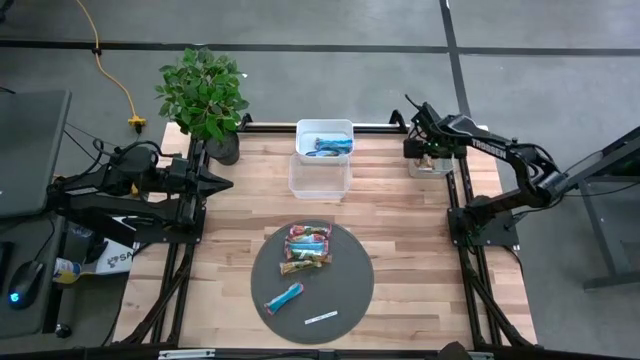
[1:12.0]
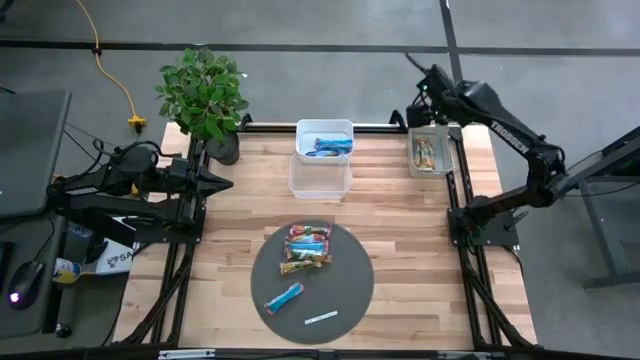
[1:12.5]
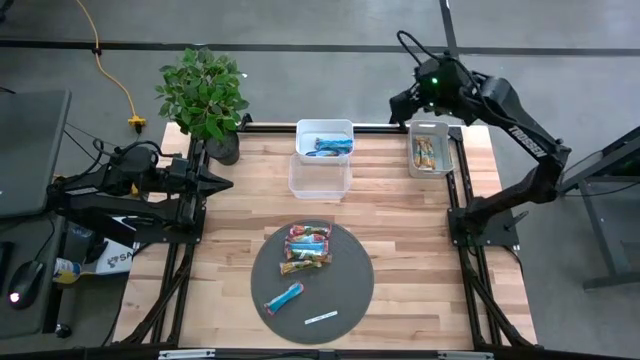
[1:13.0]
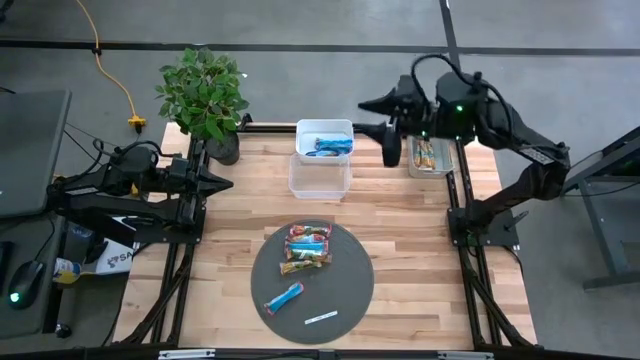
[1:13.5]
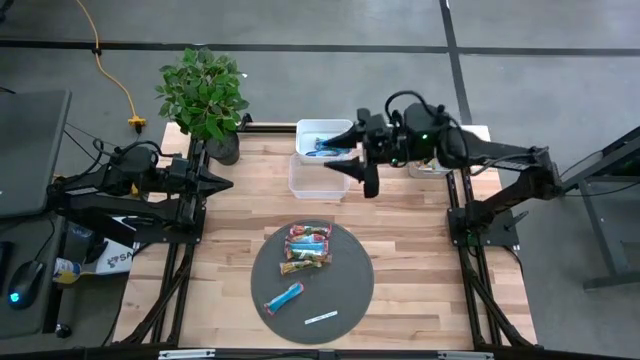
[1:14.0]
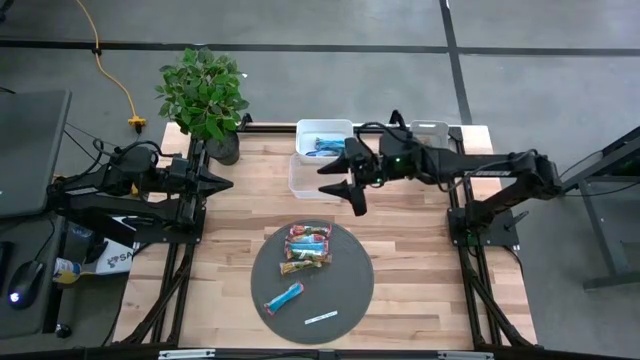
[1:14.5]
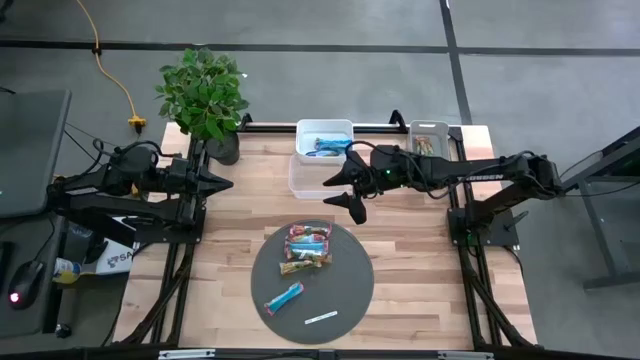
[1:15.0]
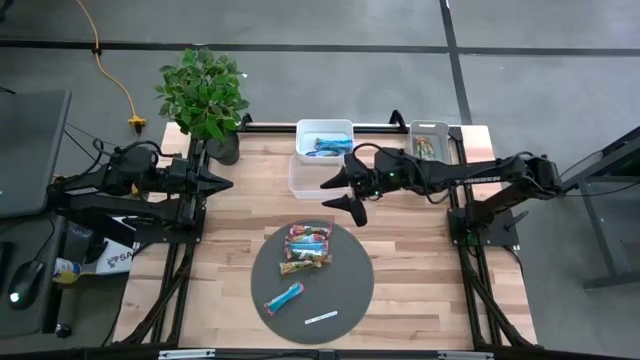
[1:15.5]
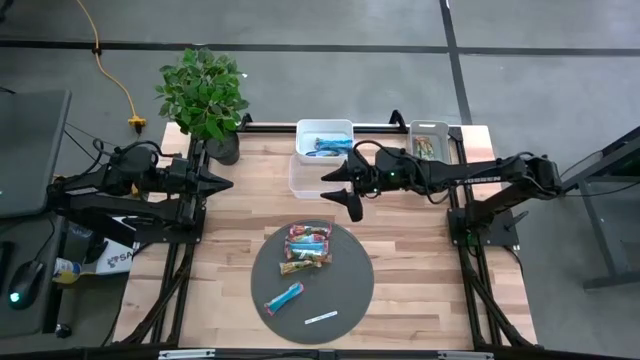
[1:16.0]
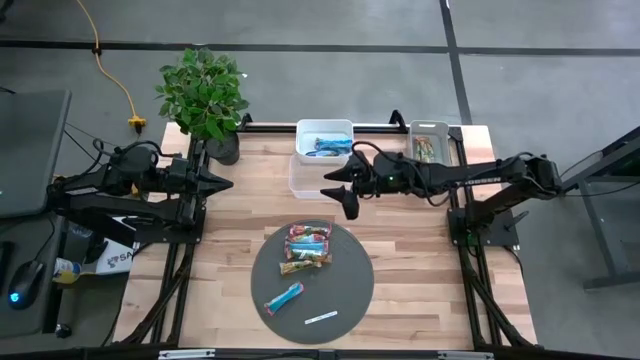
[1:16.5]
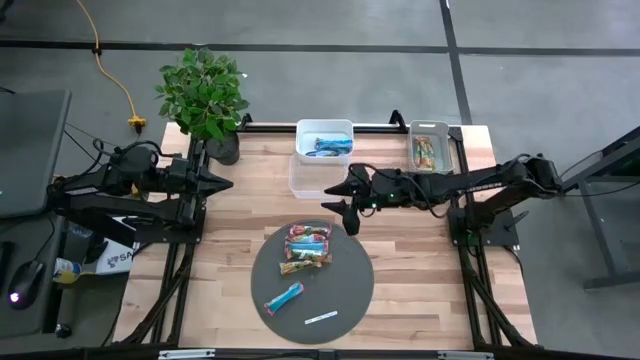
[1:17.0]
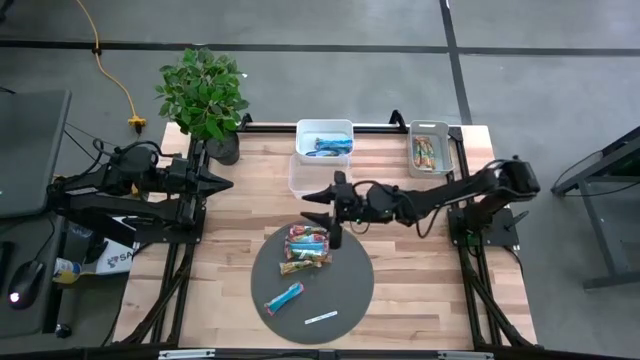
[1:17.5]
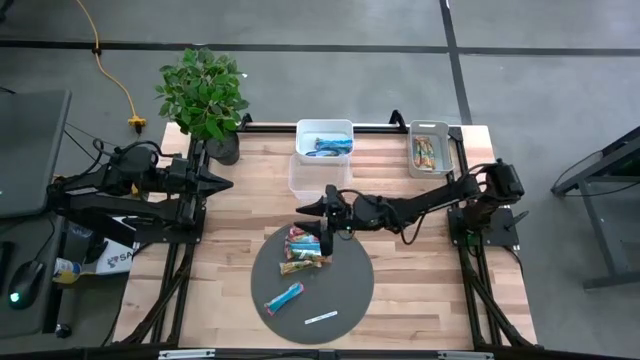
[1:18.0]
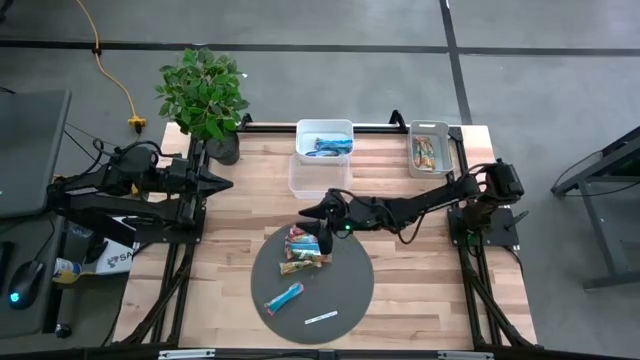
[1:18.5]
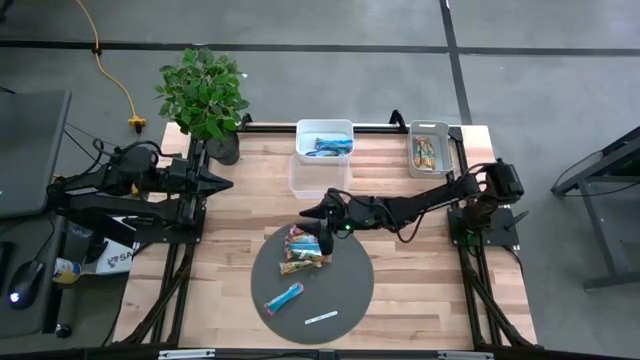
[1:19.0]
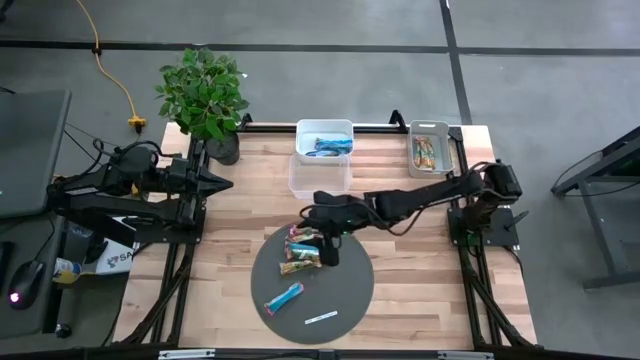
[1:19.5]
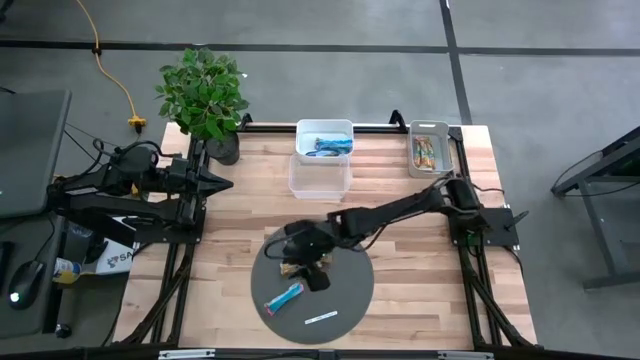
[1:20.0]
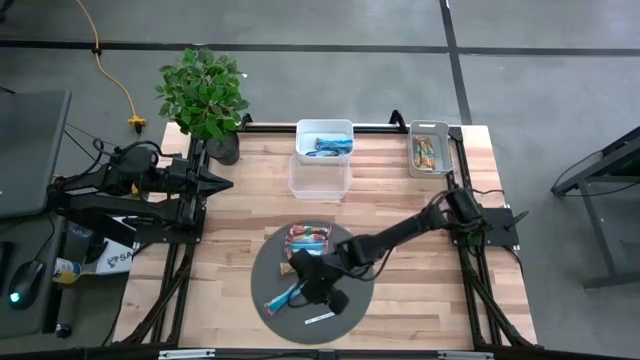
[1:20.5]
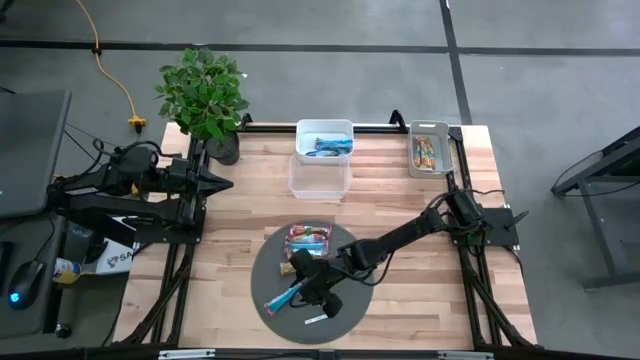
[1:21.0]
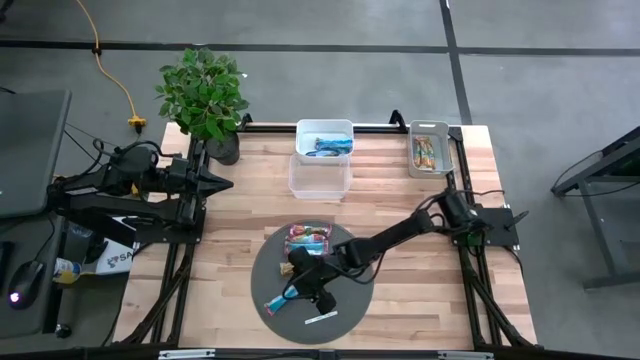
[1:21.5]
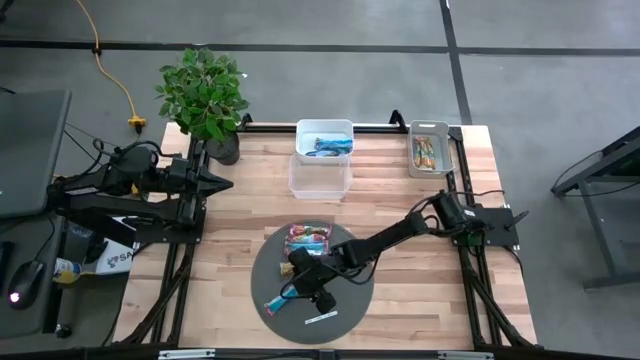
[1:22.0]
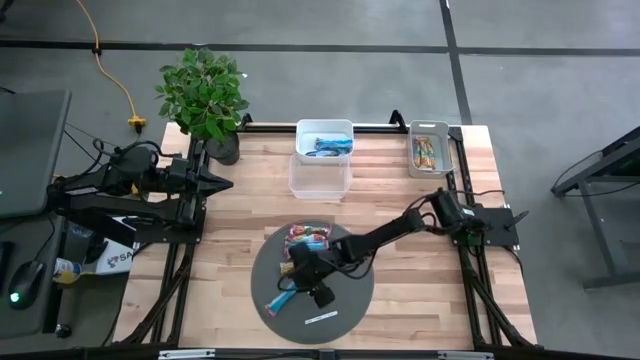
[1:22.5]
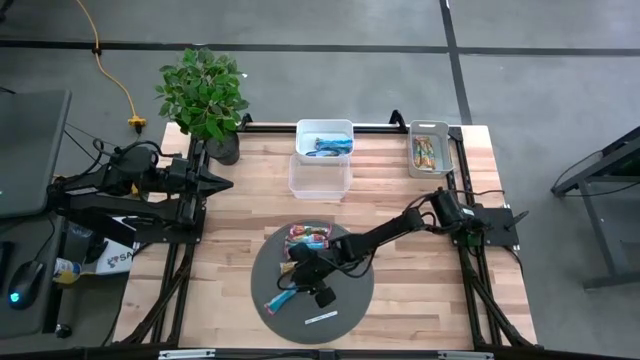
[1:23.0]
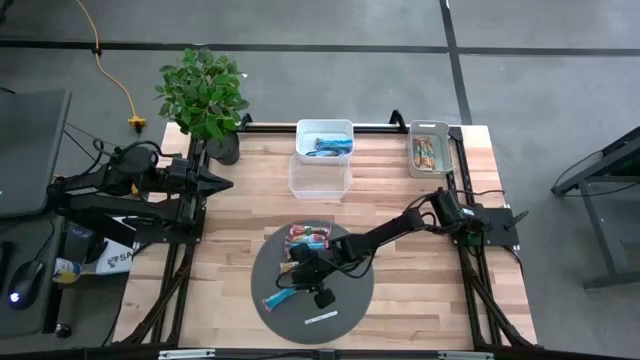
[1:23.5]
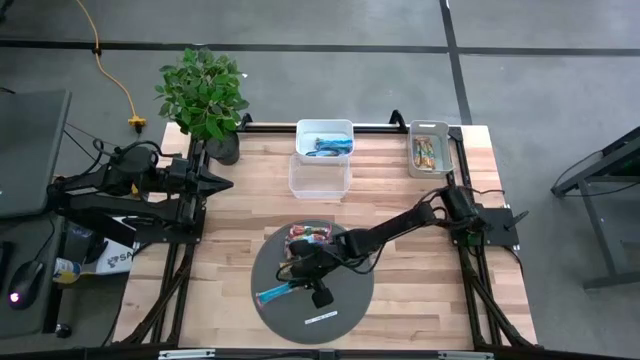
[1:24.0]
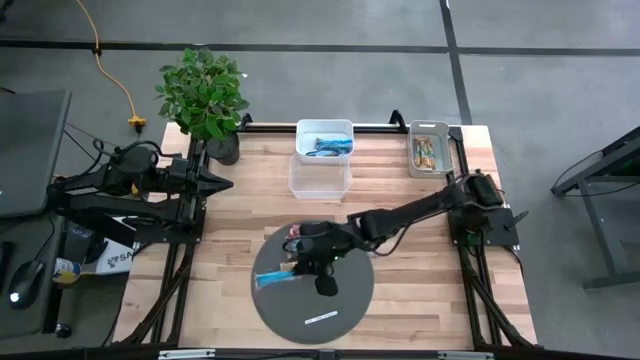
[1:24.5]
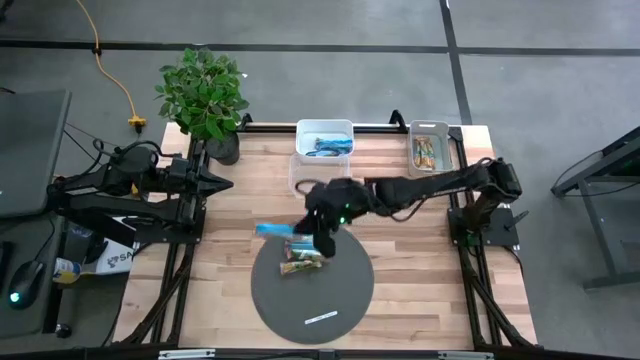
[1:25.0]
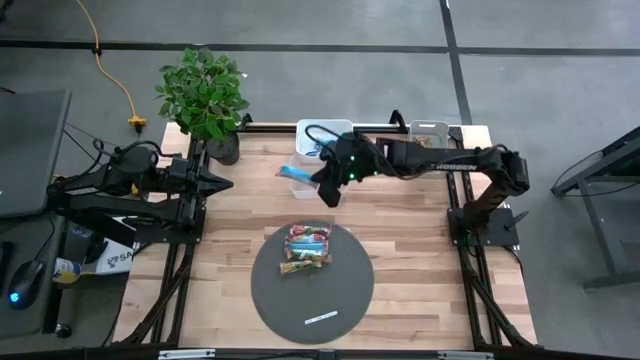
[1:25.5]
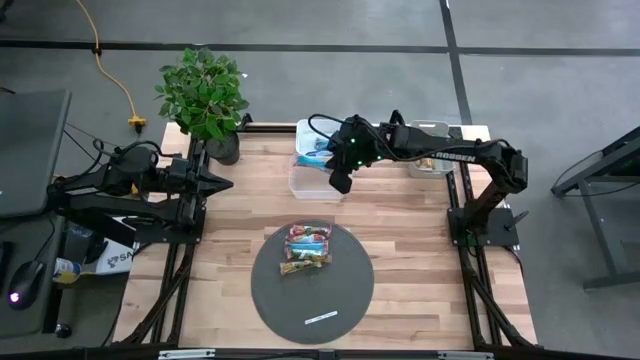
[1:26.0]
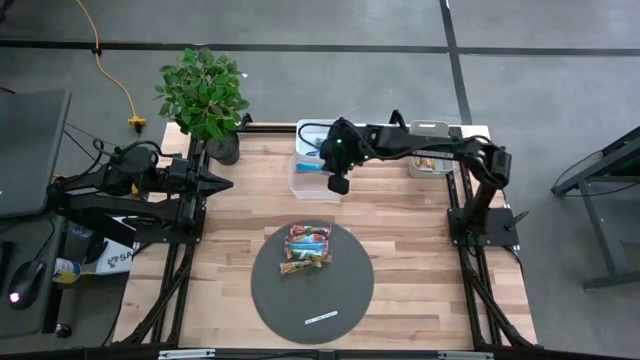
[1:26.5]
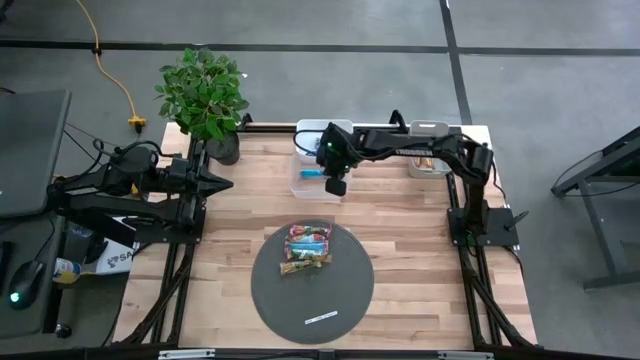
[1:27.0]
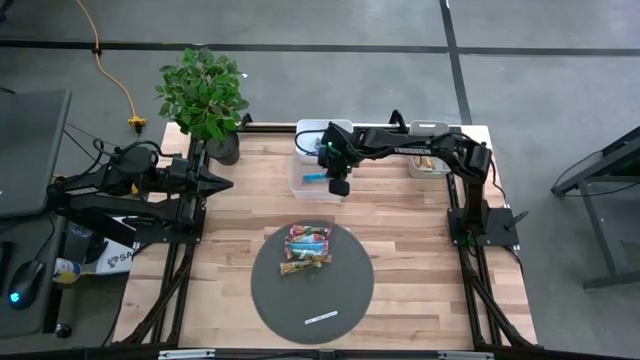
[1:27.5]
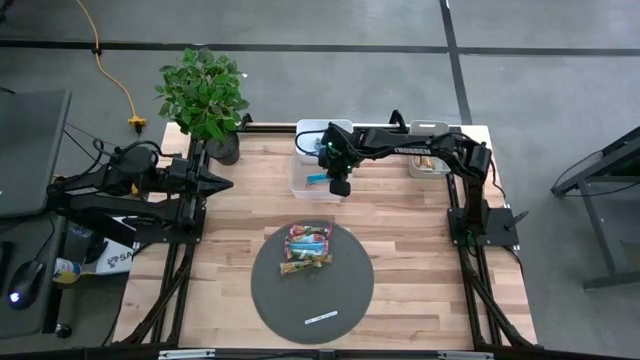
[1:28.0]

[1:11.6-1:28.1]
Task: Pick and place Granola Bars by type
Put the red granola bar into the transparent bin
